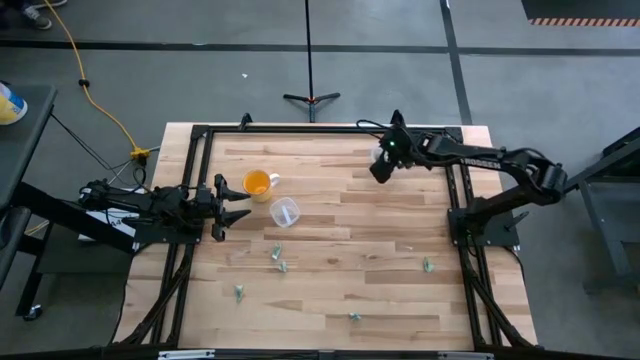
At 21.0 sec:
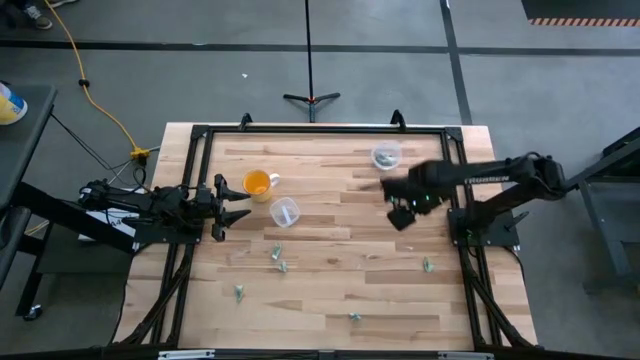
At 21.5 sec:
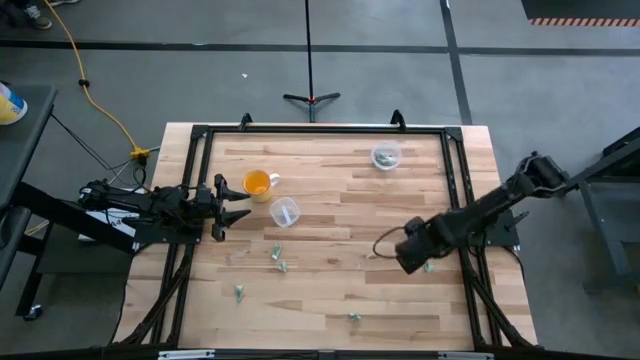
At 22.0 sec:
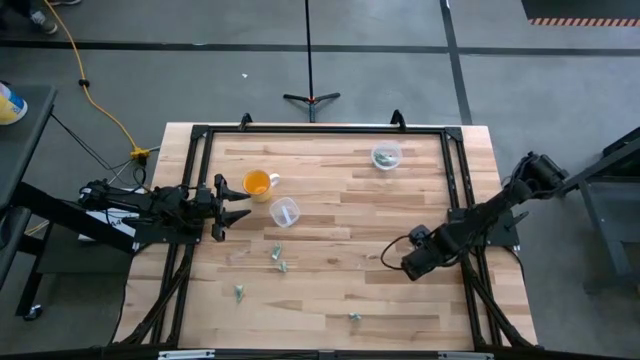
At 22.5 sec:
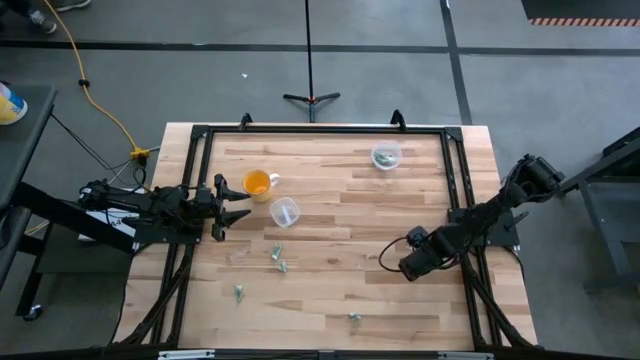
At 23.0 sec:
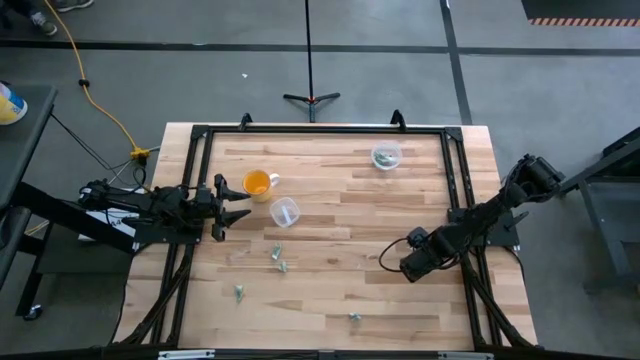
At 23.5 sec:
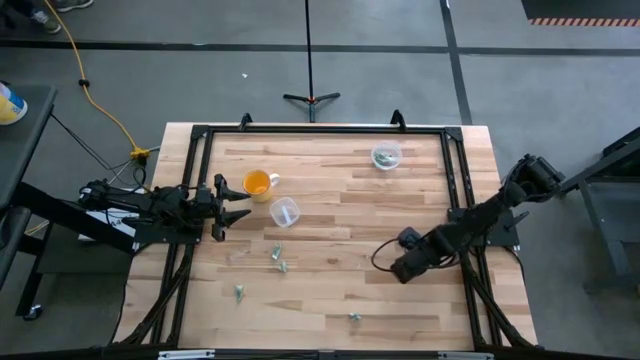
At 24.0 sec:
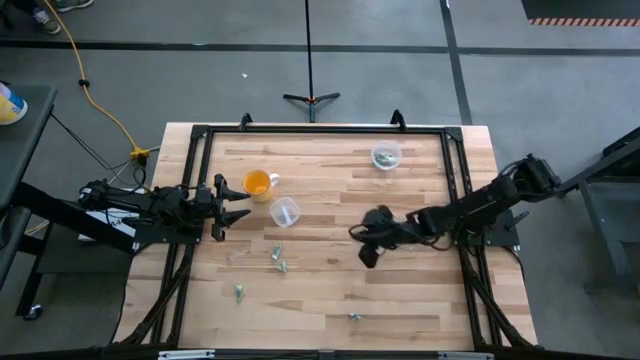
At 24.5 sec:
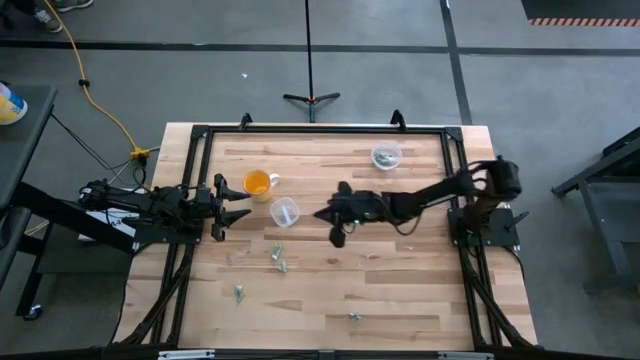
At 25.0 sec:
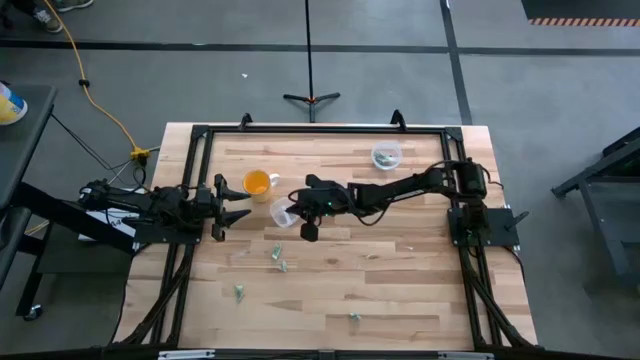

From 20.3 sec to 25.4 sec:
Task: Pick and place Stevia / Truvia into bins
Put the stevia packet into the bottom transparent container

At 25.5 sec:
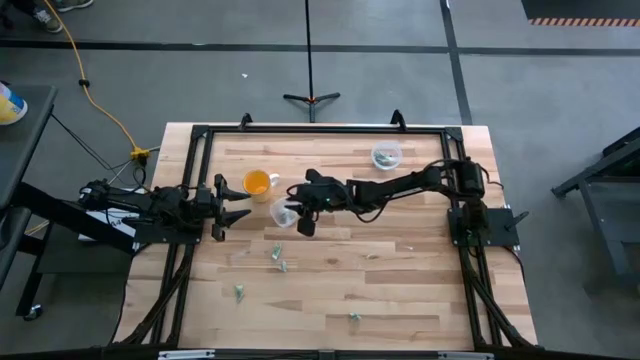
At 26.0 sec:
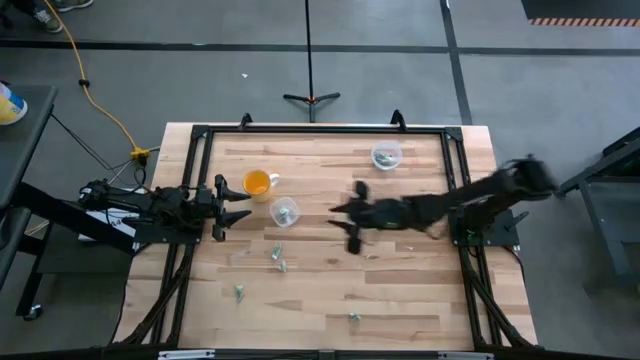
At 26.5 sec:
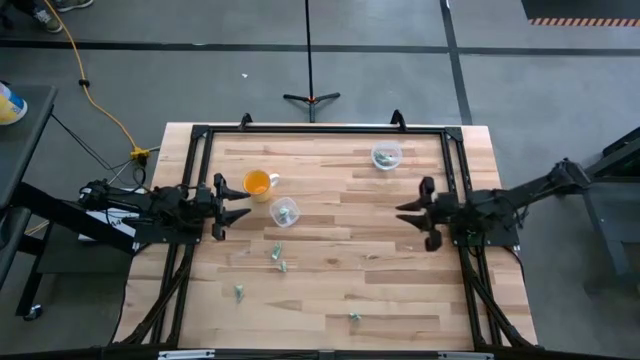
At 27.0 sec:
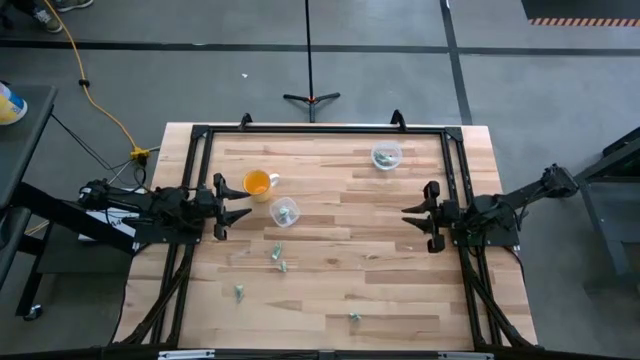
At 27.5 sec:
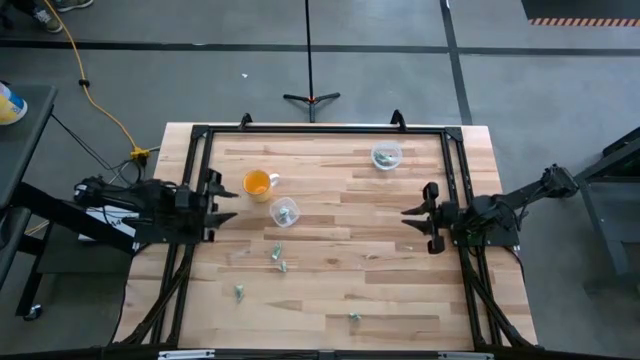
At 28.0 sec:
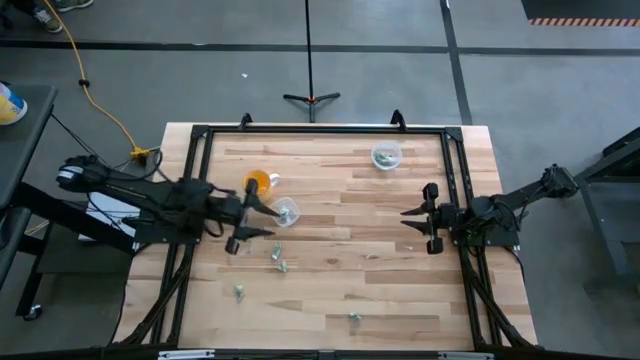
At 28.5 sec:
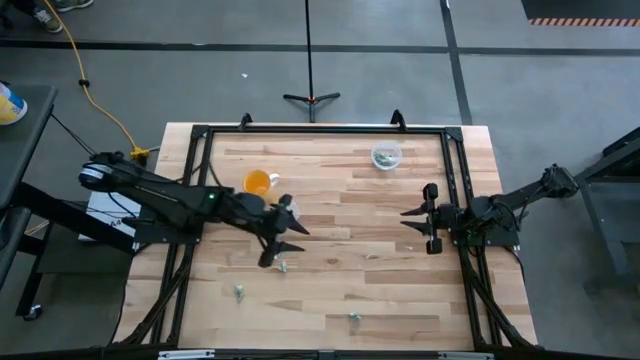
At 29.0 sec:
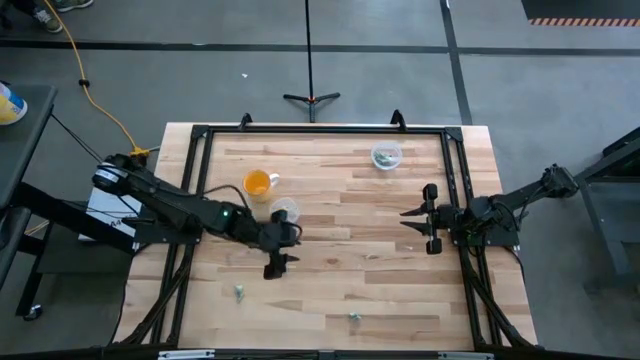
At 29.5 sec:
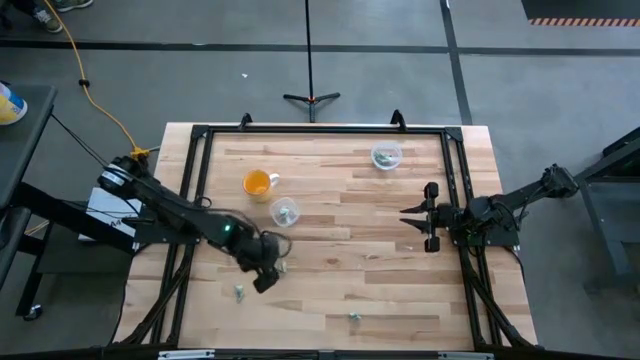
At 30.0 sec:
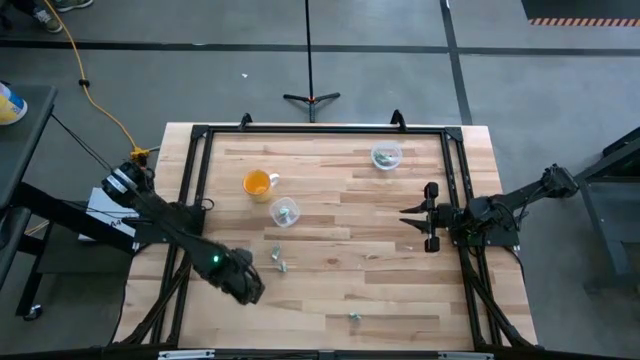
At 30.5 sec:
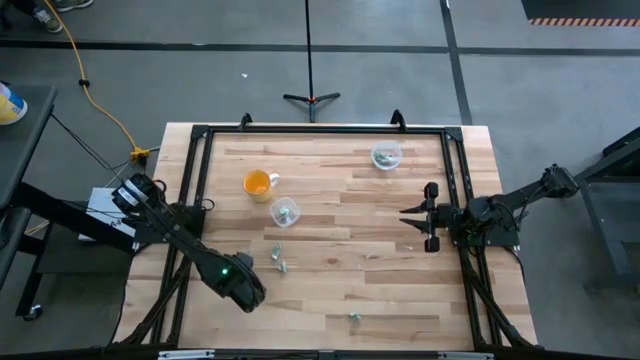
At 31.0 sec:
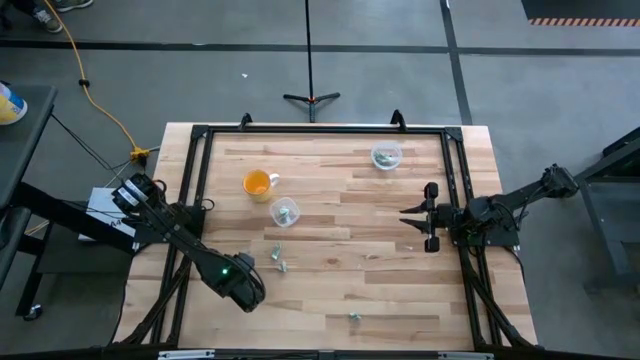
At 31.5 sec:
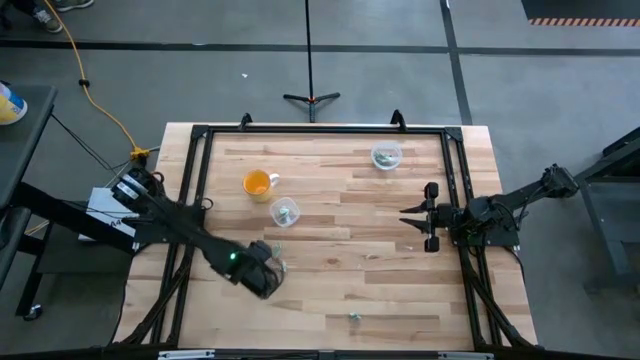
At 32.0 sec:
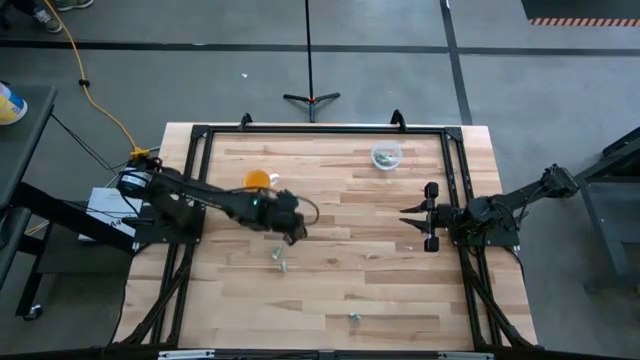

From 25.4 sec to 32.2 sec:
Put the stevia packet into the bottom transparent container

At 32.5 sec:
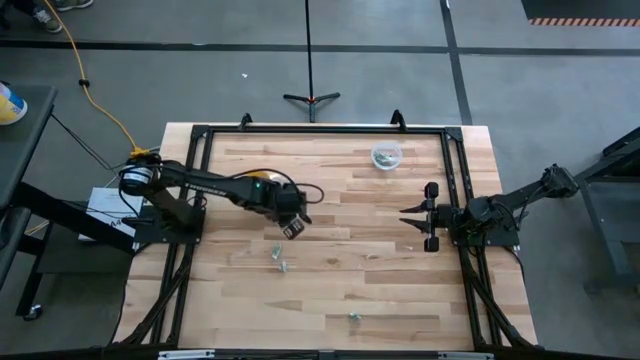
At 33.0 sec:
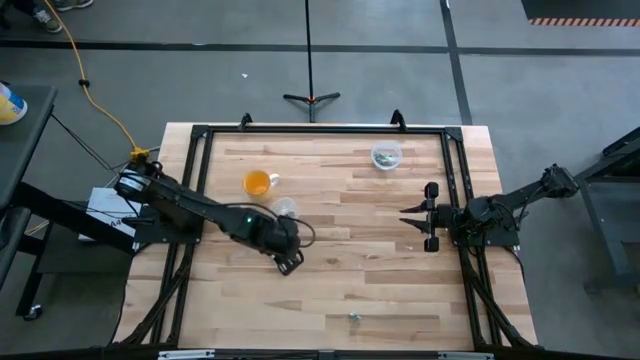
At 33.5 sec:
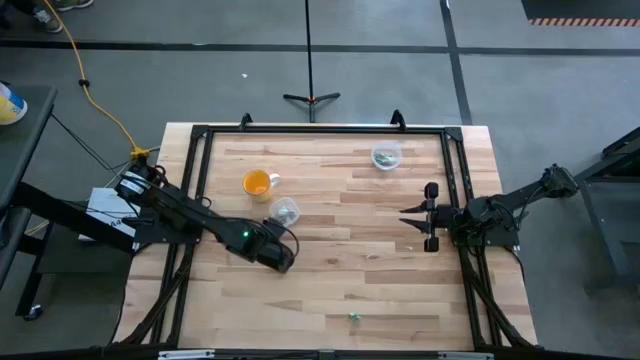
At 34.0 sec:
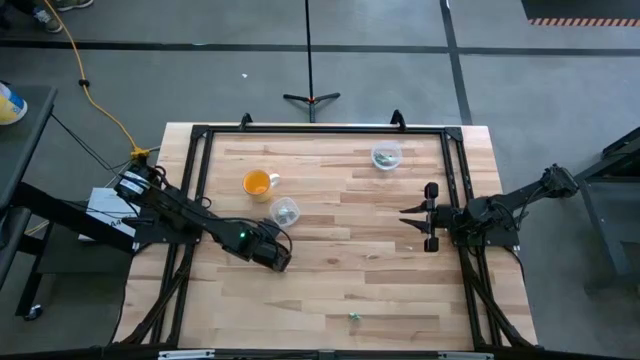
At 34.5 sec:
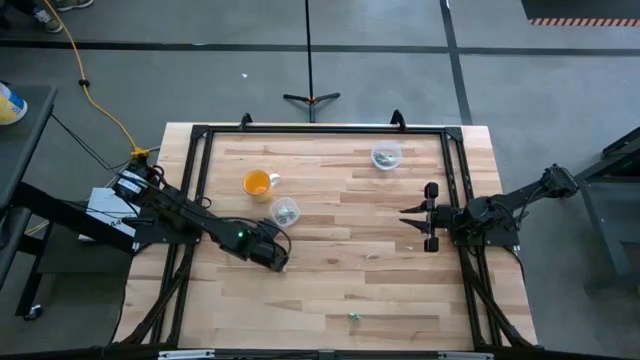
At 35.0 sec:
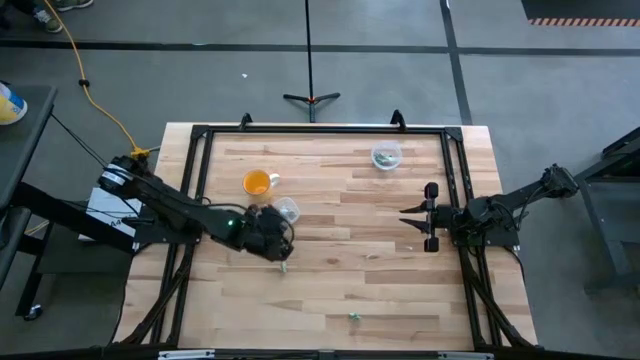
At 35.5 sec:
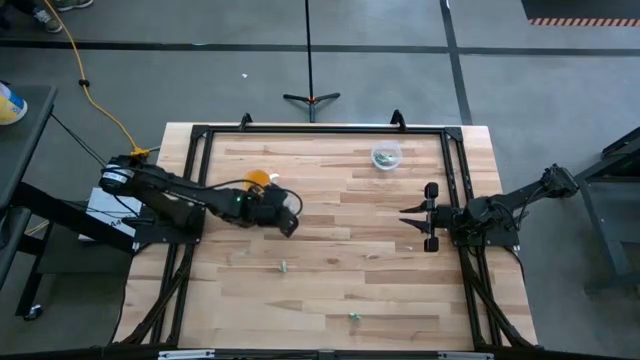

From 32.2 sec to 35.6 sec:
Put the stevia packet into the bottom transparent container

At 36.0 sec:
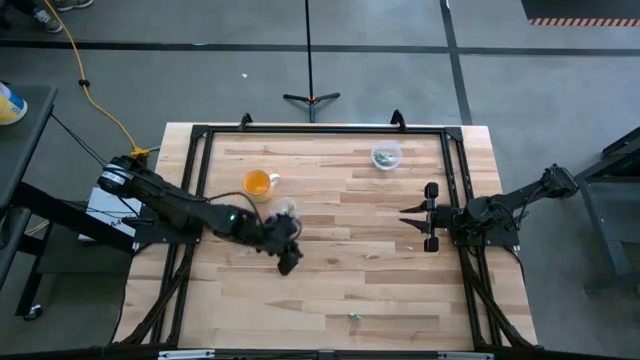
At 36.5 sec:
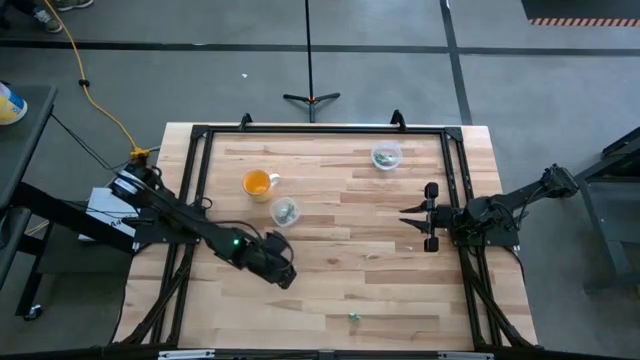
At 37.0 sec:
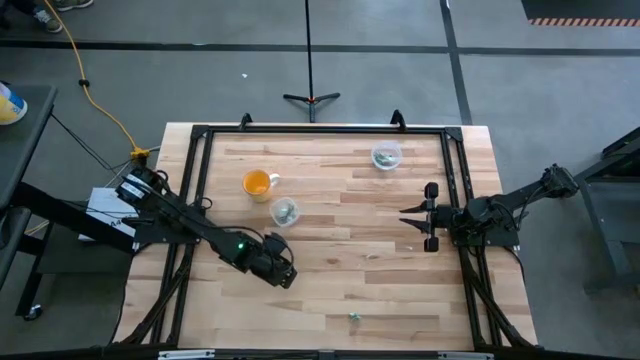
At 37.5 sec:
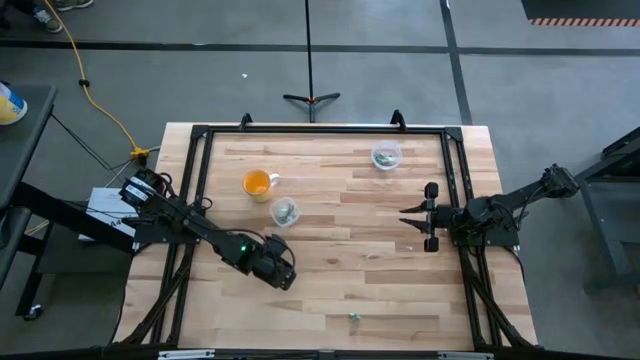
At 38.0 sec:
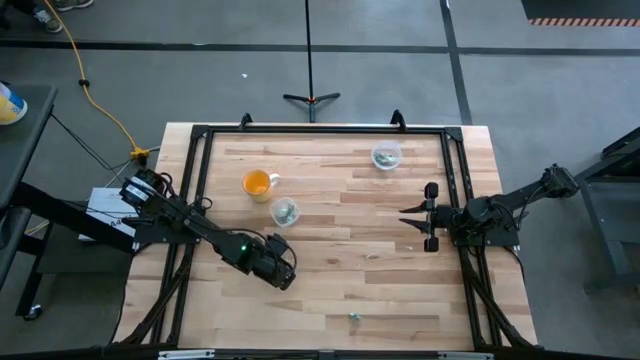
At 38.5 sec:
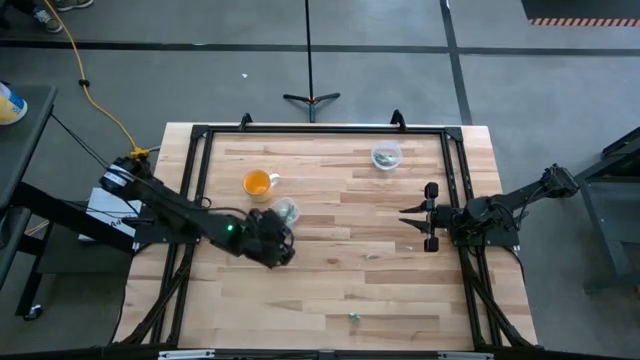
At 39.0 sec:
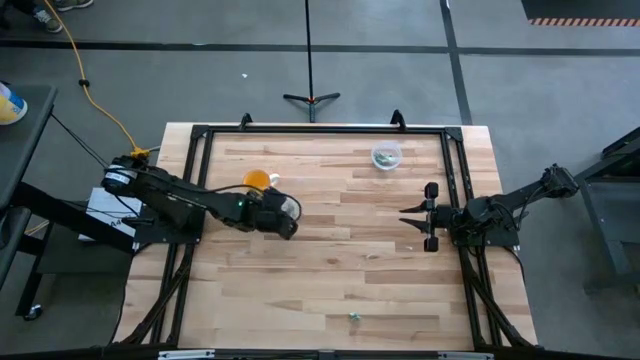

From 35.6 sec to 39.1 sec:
Put the stevia packet into the bottom transparent container

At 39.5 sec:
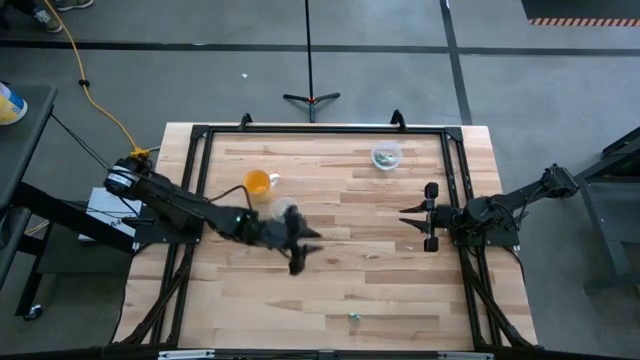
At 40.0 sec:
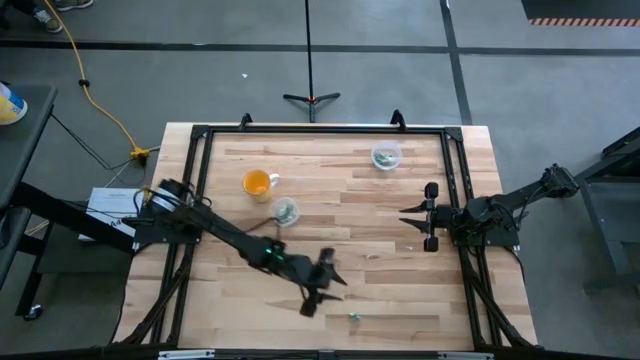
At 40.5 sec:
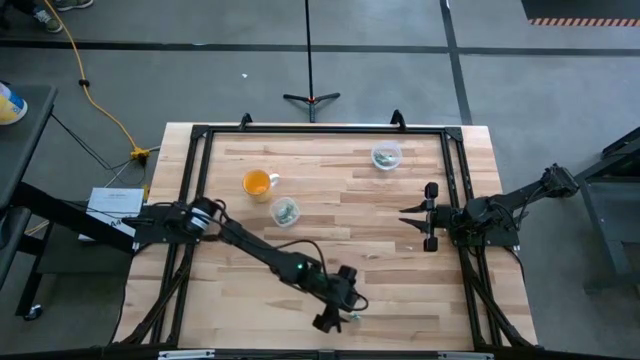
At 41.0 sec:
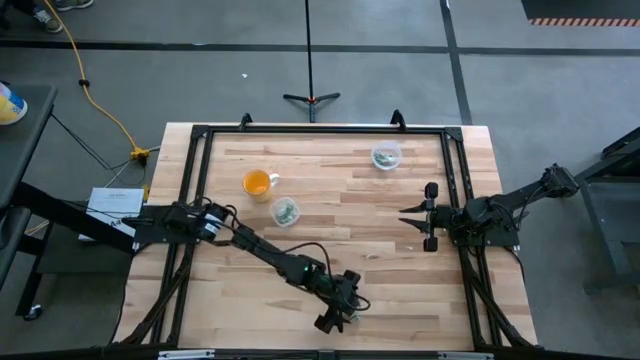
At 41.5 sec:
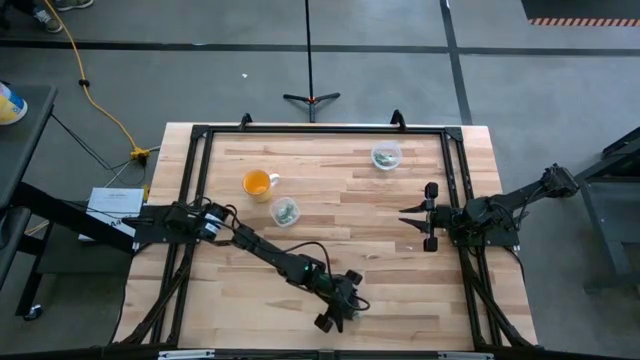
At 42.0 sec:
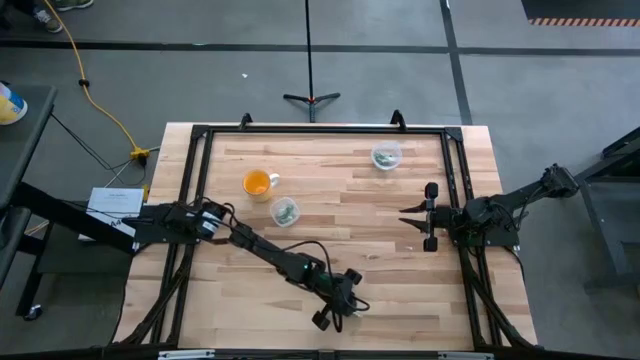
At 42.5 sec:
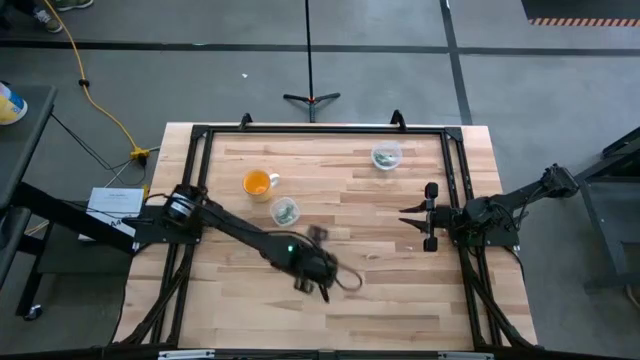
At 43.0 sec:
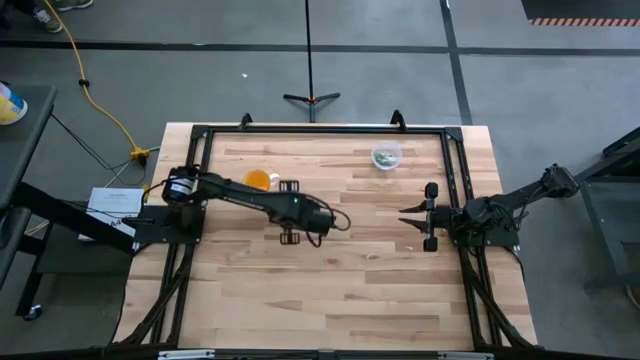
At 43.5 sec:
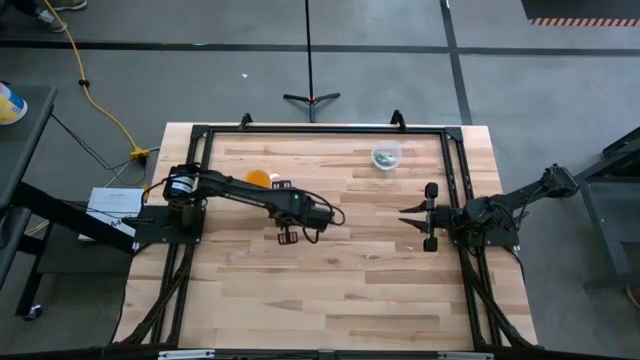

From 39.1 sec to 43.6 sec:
Put the stevia packet into the bottom transparent container
